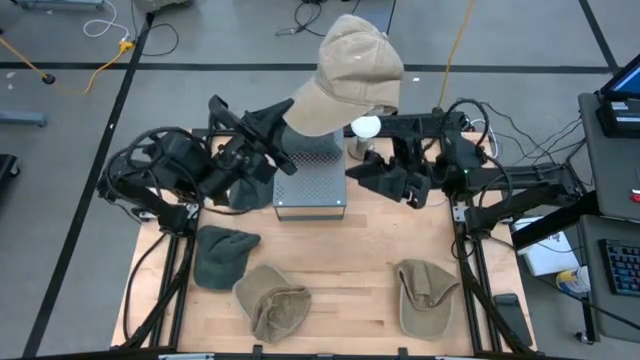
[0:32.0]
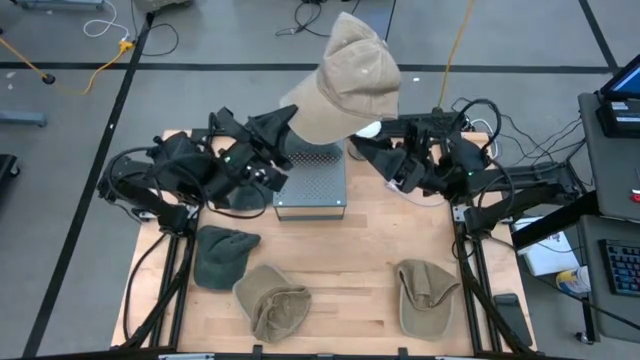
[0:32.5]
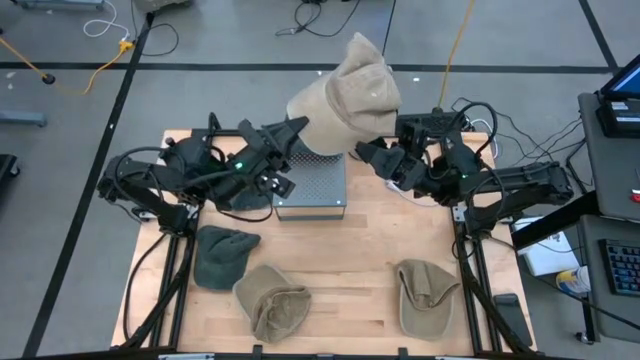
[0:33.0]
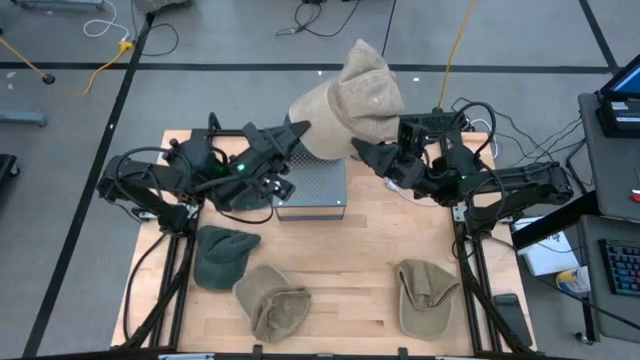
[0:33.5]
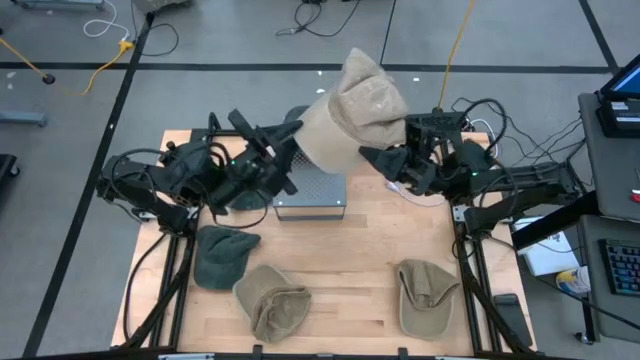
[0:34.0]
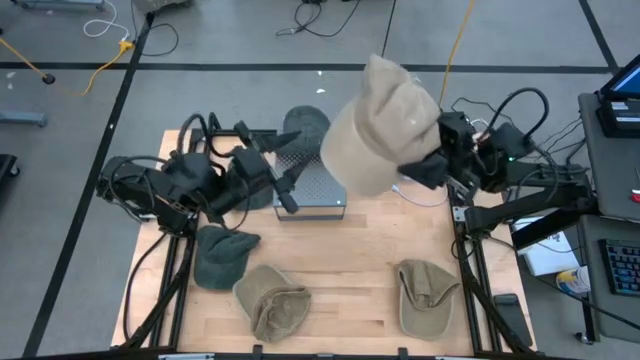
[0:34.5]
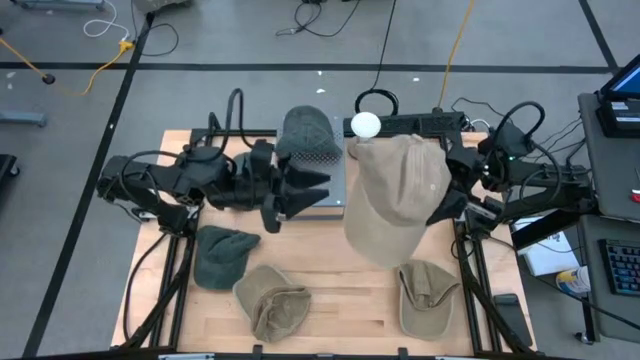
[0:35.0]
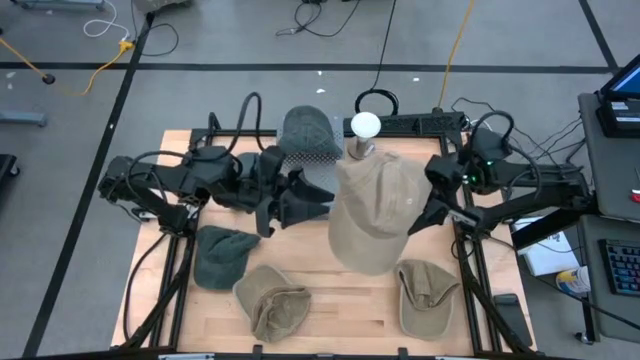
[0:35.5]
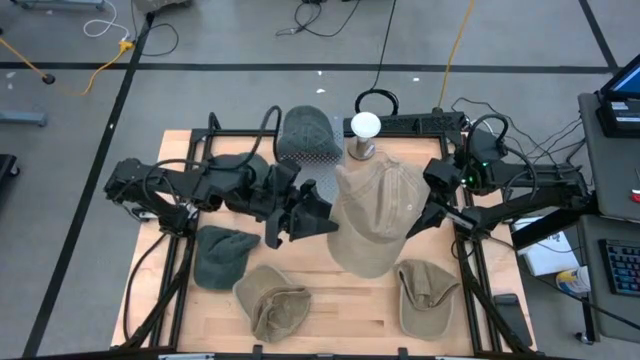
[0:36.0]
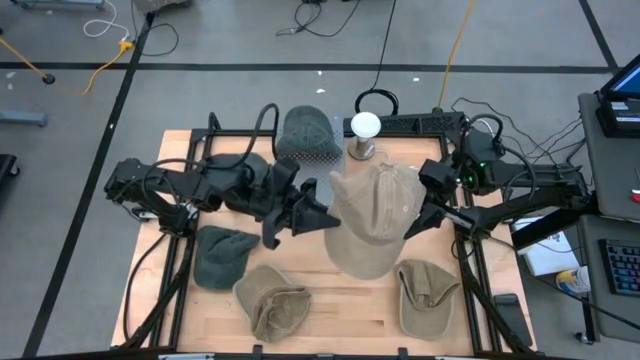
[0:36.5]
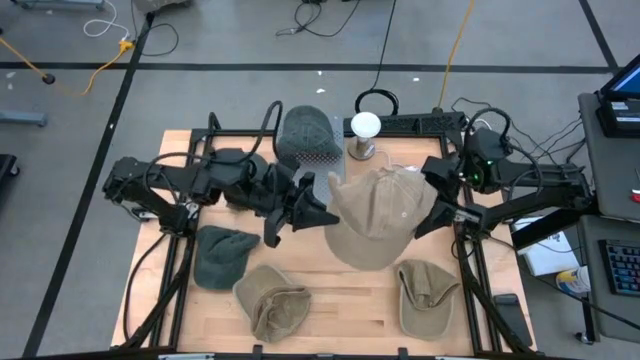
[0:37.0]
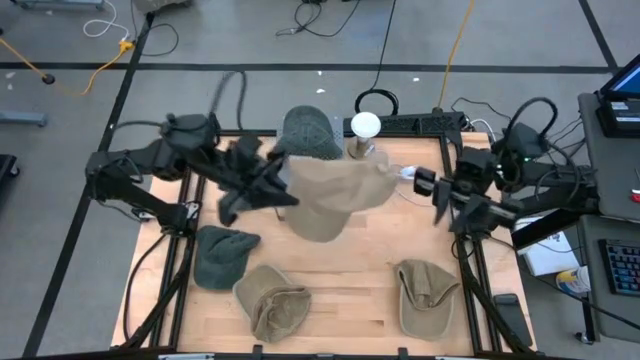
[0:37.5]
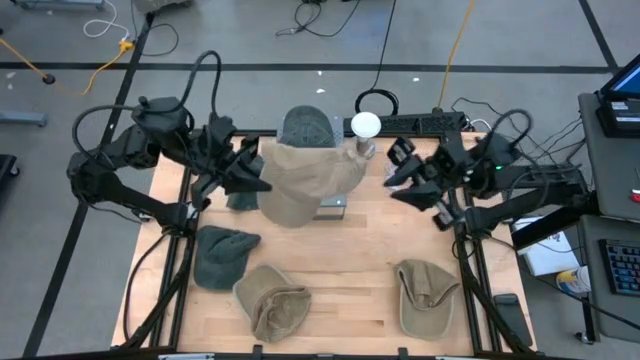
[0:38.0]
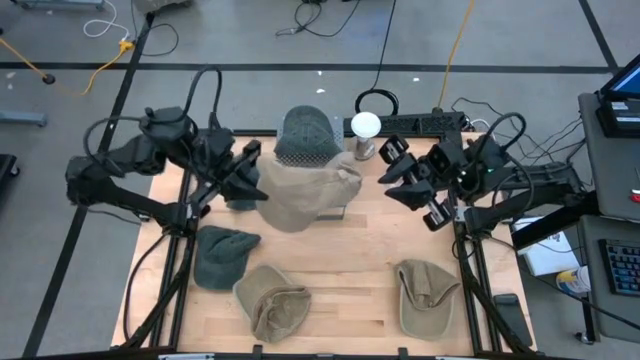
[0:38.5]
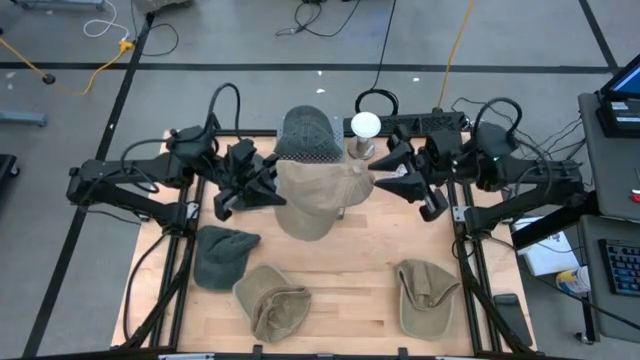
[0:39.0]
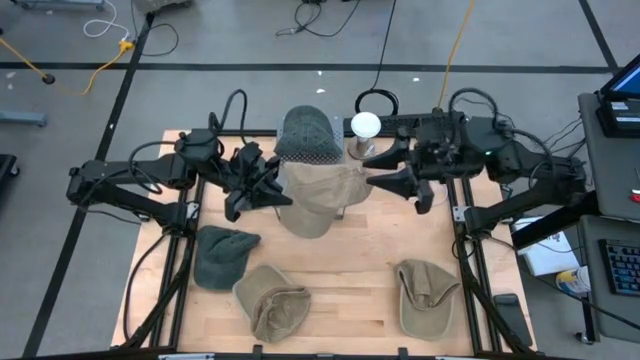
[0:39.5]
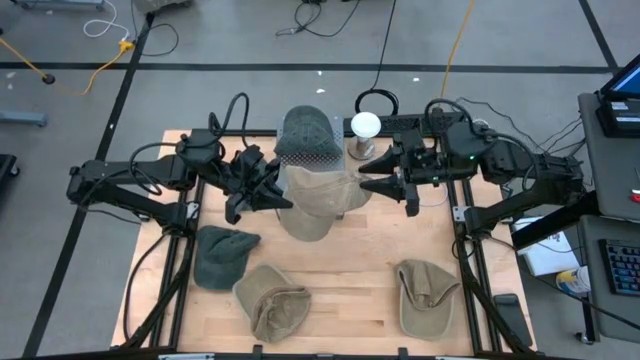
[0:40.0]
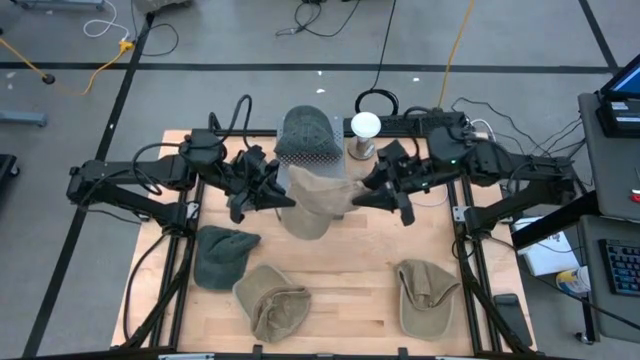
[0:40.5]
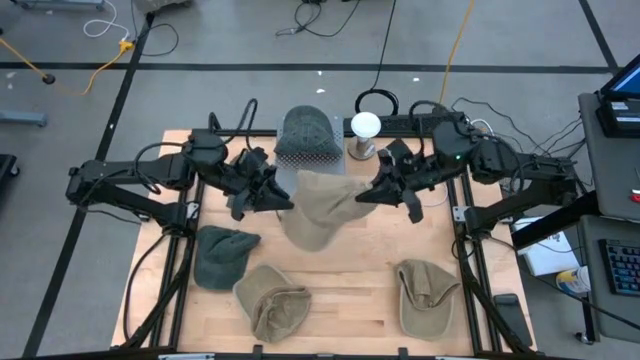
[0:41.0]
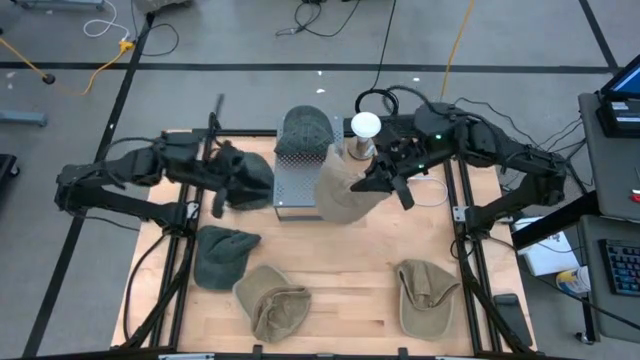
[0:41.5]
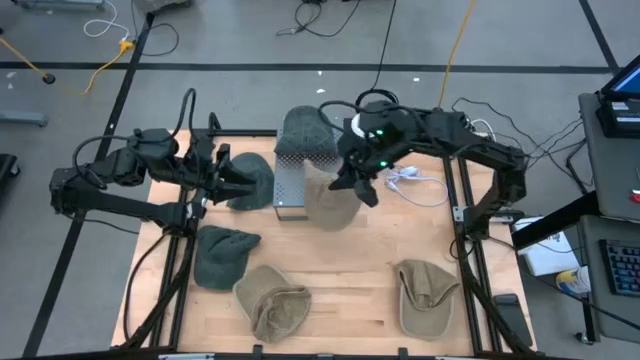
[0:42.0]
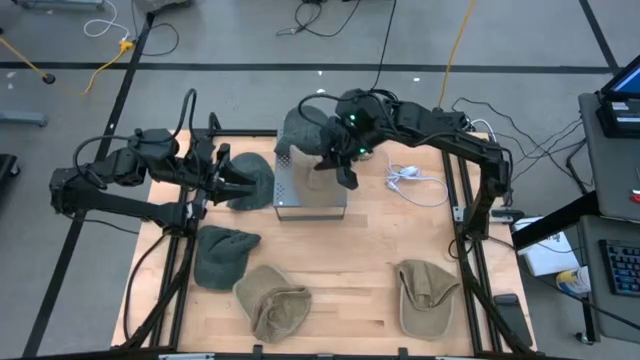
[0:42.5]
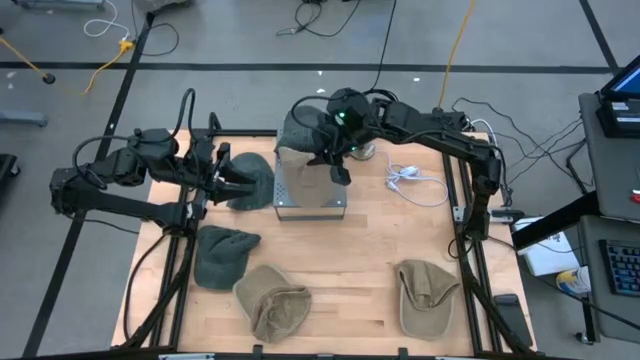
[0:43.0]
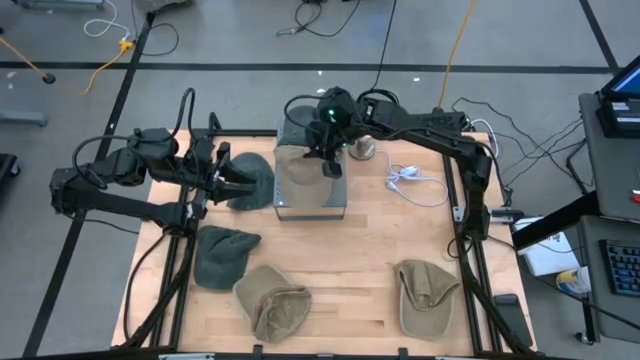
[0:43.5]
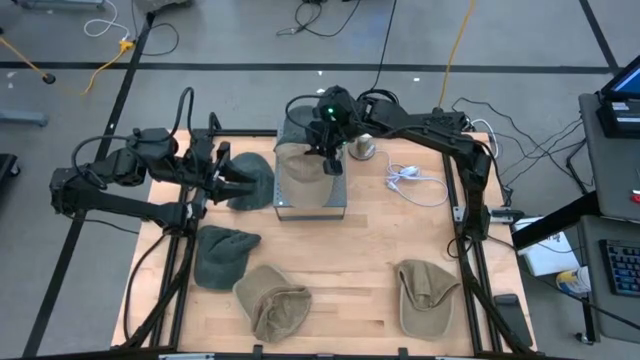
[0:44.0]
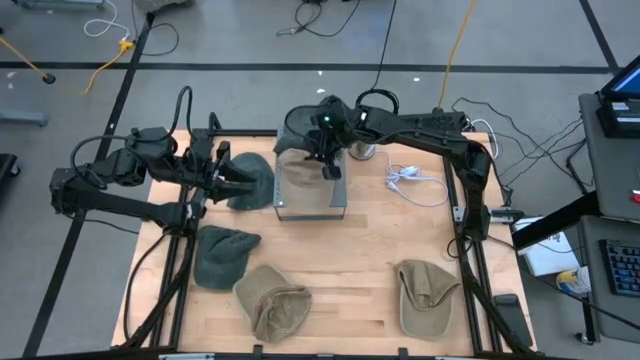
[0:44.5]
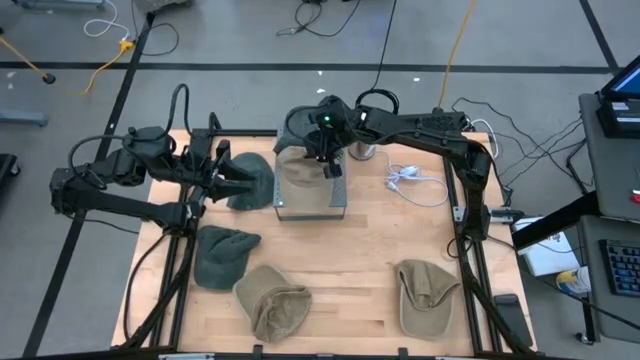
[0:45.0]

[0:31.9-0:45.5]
Task: Pick & Place hat
Put the middle brown cap on the shelf

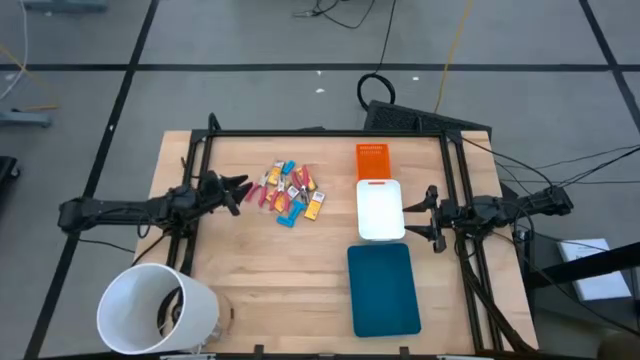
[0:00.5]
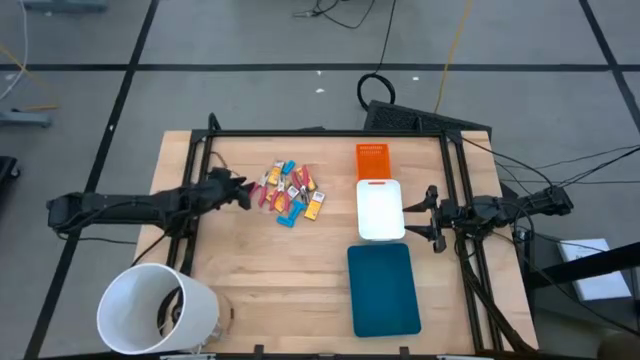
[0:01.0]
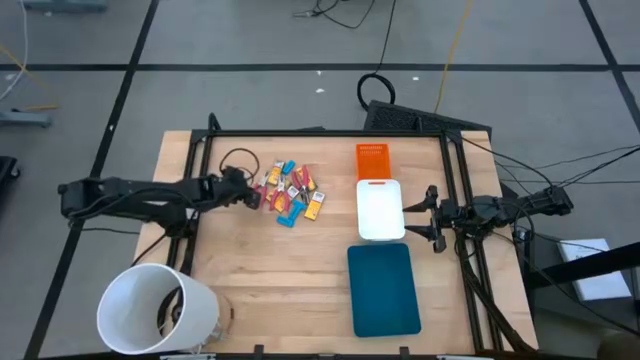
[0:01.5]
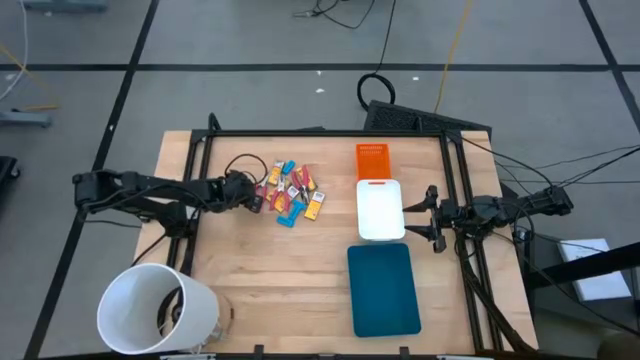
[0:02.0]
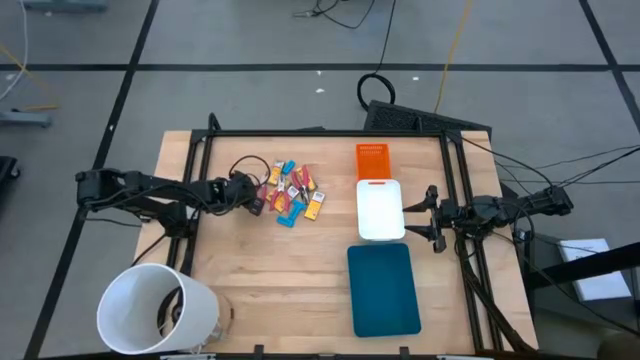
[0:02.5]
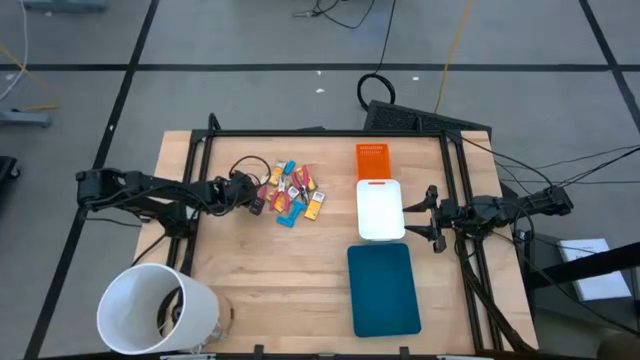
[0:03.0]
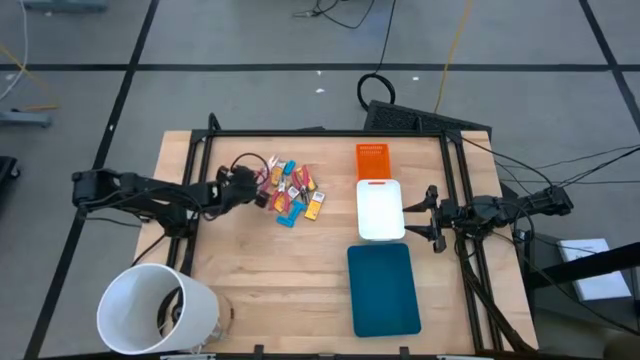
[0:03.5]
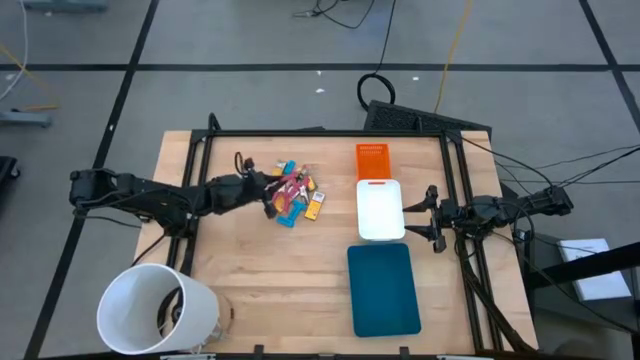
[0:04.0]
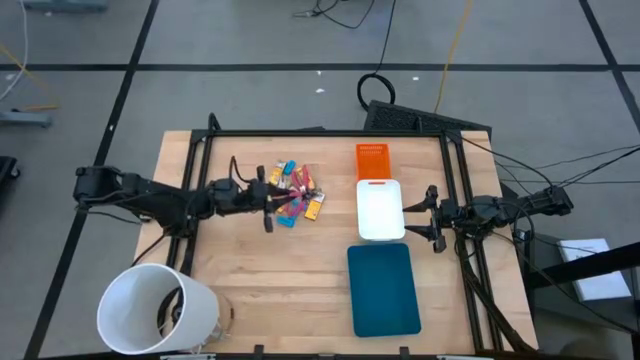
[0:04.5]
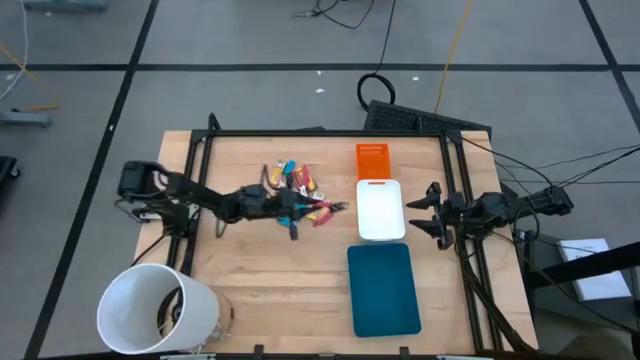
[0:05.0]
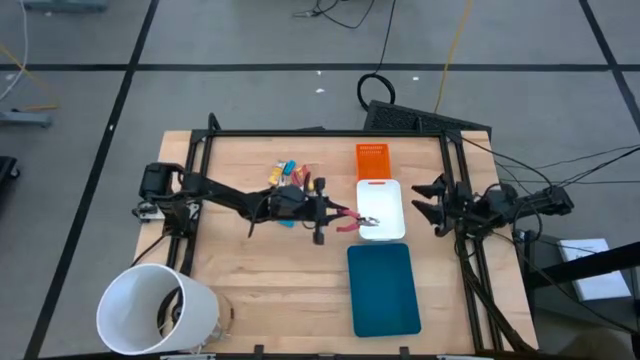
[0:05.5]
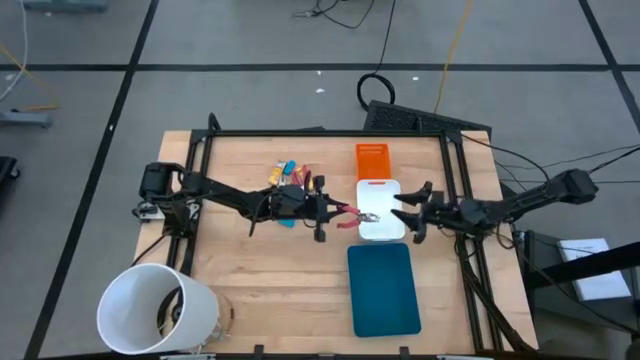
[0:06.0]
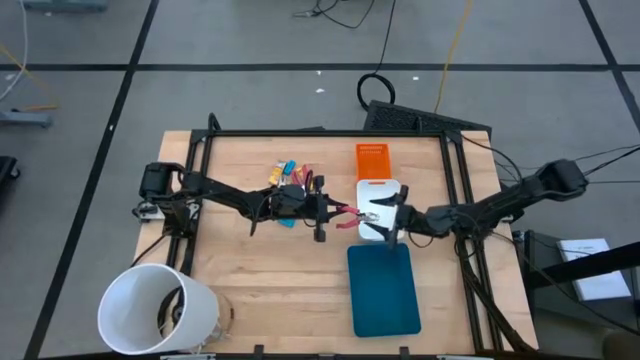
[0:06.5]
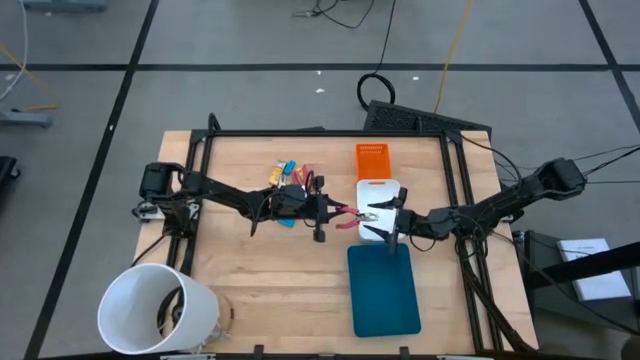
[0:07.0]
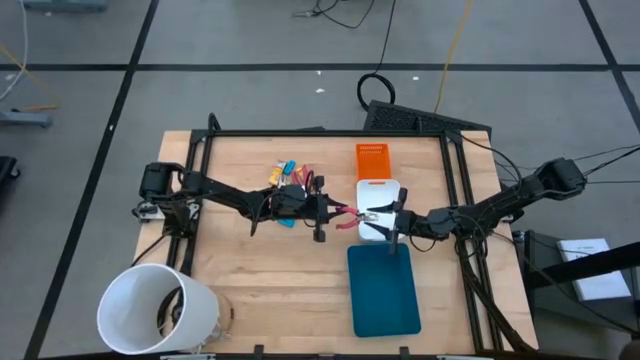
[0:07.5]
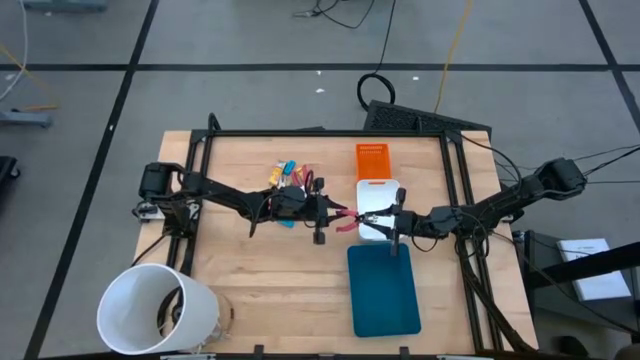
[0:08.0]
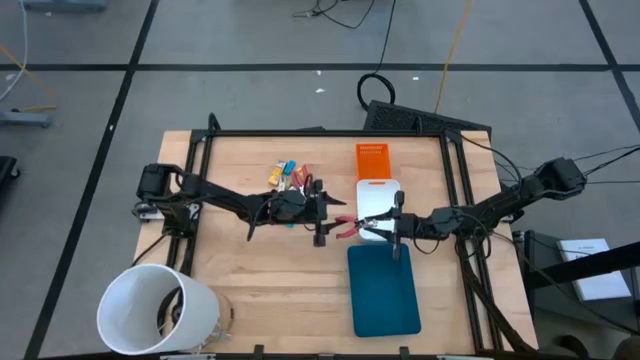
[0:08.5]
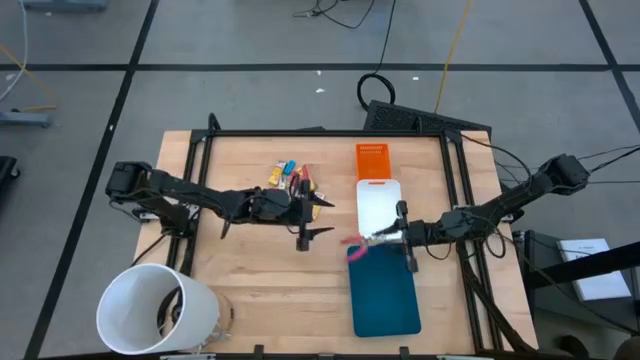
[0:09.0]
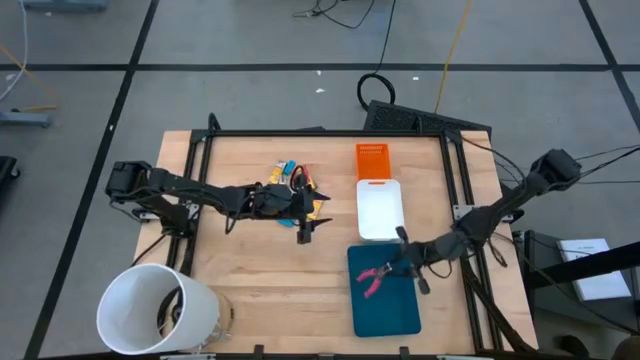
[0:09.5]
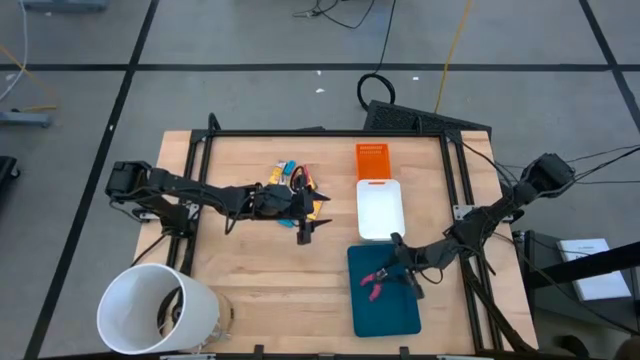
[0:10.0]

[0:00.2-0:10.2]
Task: Pick & Place School Supplies
Put the pink puncher into the blue bin
